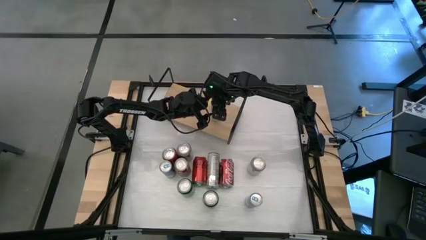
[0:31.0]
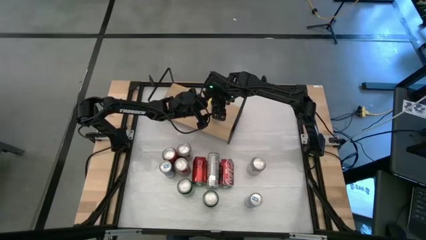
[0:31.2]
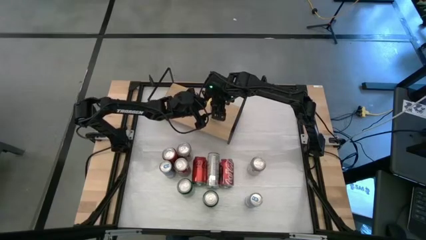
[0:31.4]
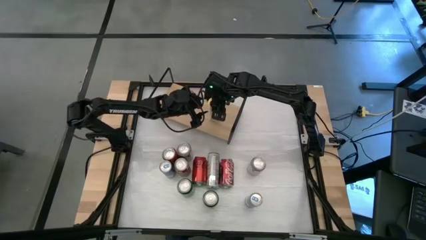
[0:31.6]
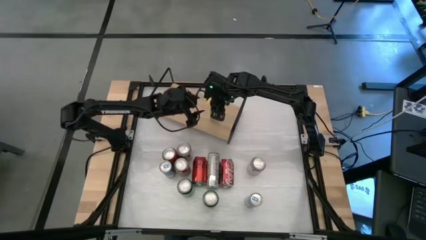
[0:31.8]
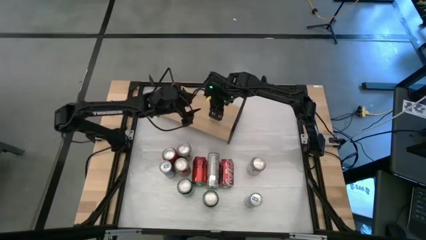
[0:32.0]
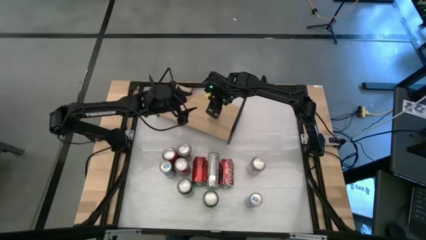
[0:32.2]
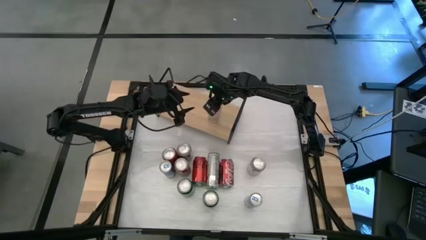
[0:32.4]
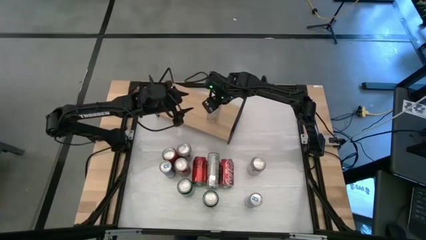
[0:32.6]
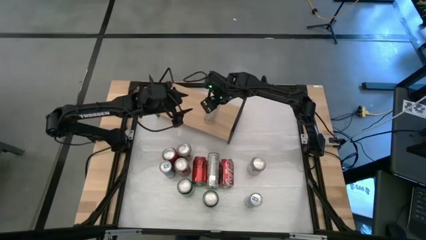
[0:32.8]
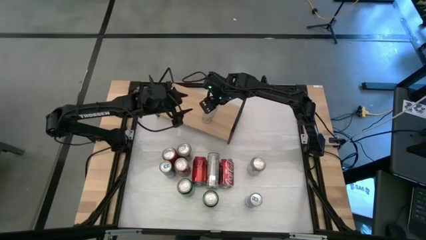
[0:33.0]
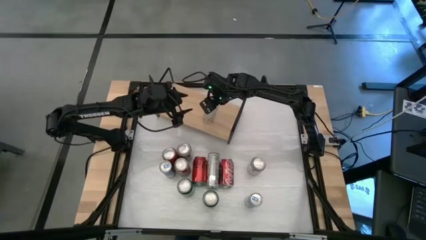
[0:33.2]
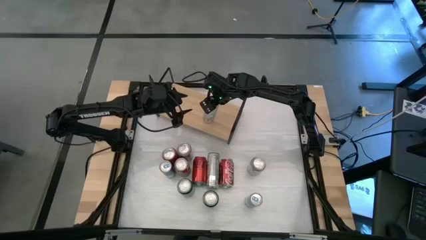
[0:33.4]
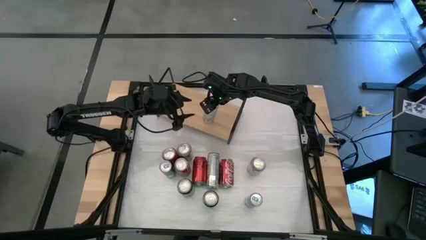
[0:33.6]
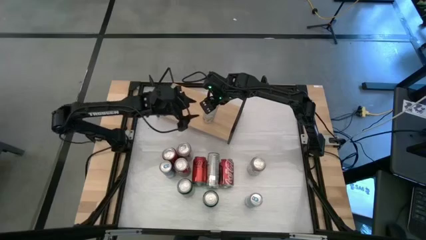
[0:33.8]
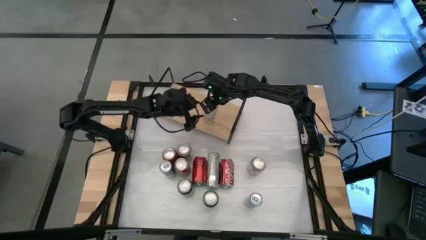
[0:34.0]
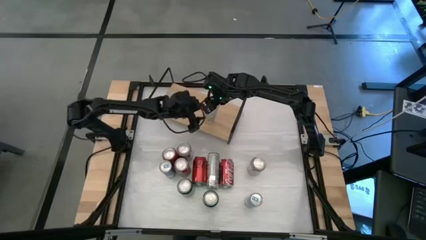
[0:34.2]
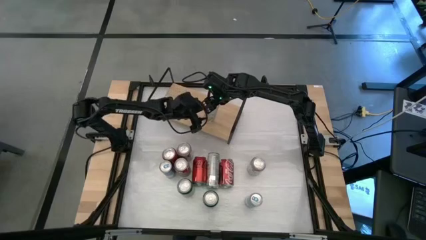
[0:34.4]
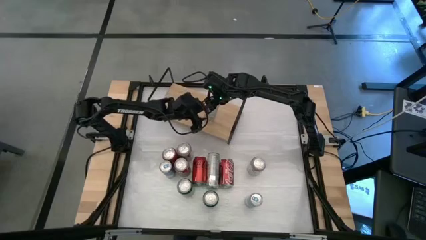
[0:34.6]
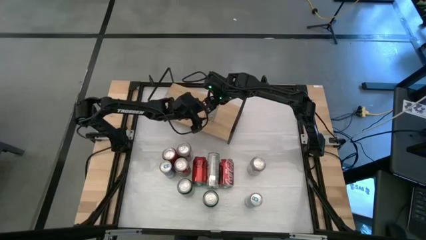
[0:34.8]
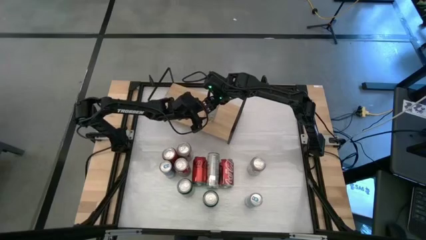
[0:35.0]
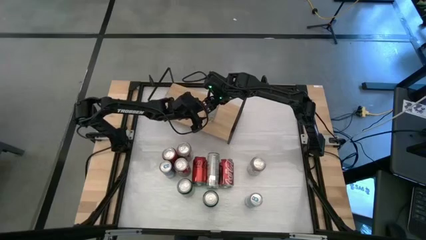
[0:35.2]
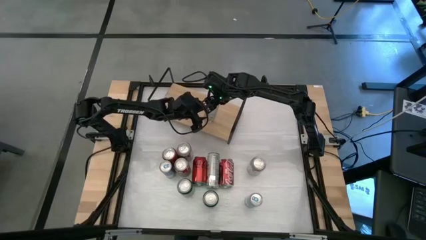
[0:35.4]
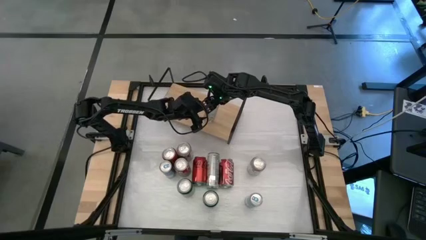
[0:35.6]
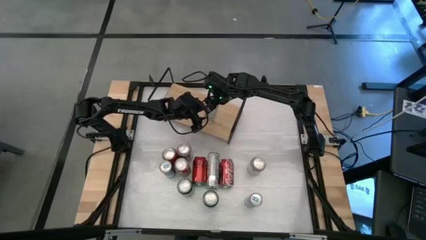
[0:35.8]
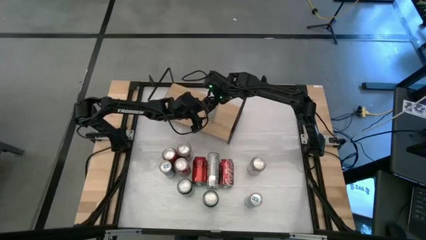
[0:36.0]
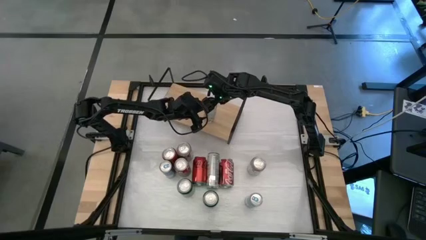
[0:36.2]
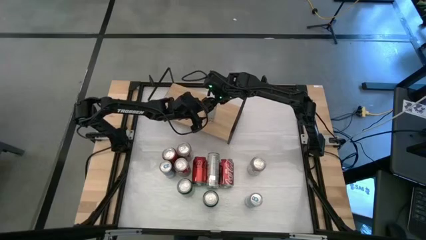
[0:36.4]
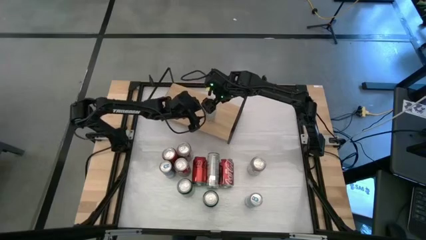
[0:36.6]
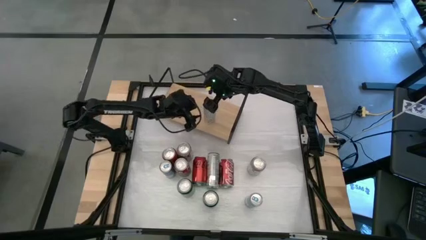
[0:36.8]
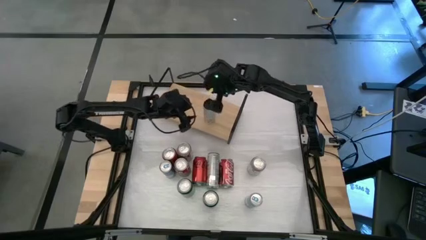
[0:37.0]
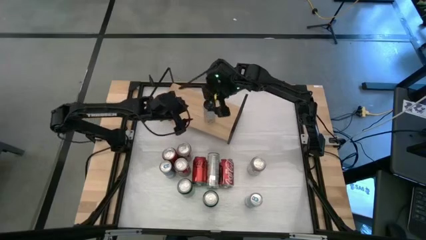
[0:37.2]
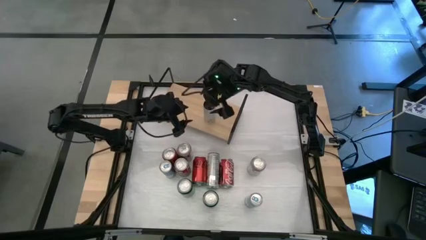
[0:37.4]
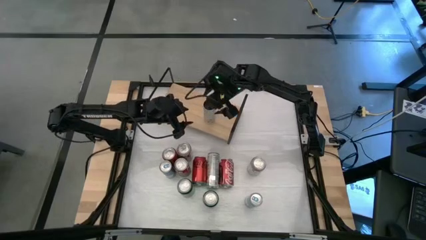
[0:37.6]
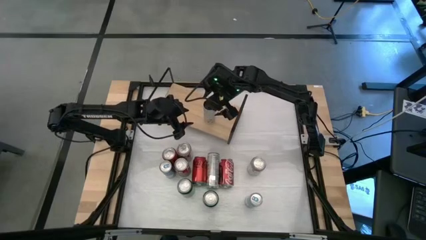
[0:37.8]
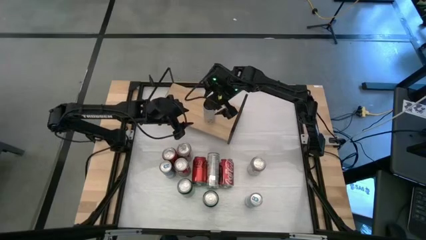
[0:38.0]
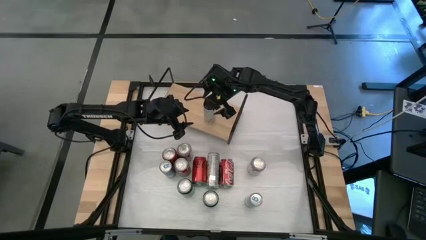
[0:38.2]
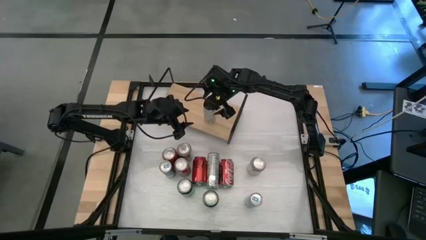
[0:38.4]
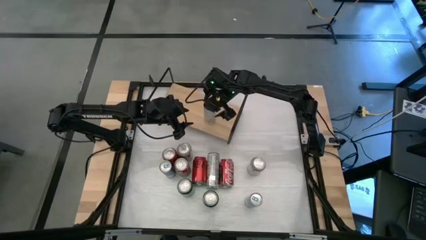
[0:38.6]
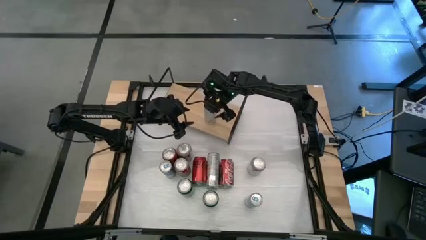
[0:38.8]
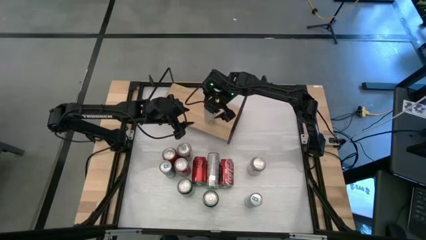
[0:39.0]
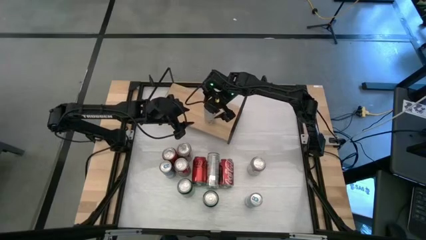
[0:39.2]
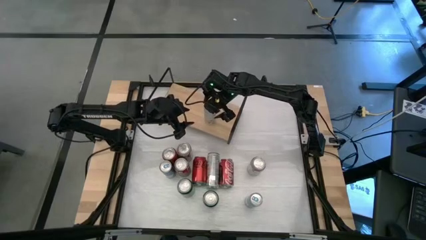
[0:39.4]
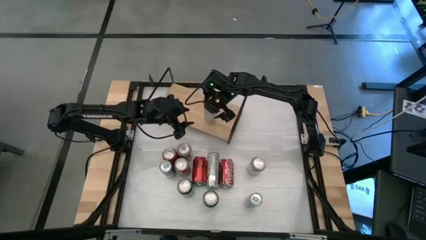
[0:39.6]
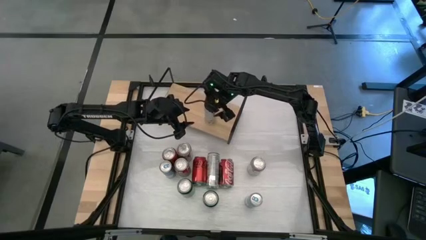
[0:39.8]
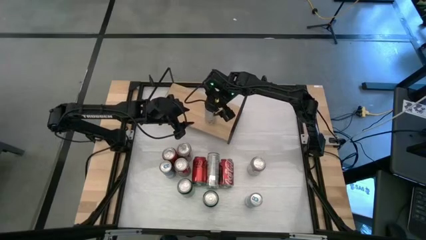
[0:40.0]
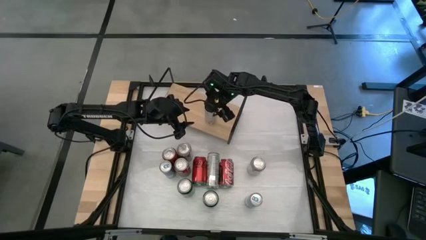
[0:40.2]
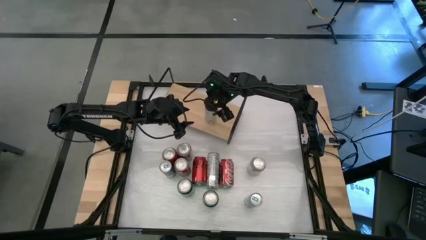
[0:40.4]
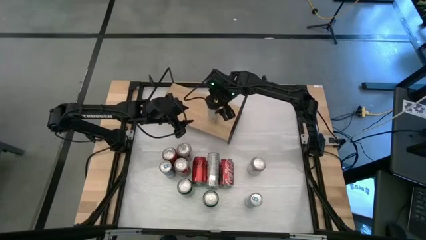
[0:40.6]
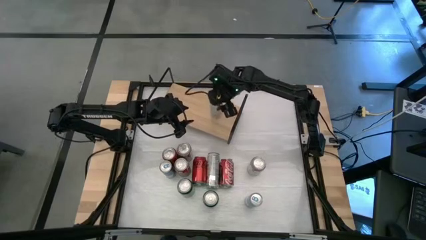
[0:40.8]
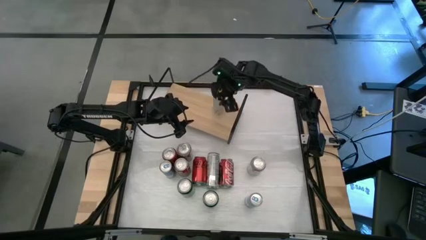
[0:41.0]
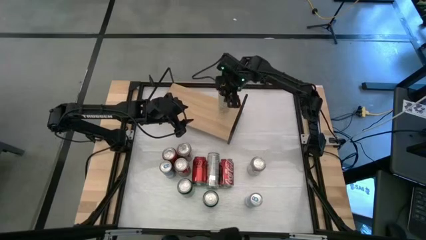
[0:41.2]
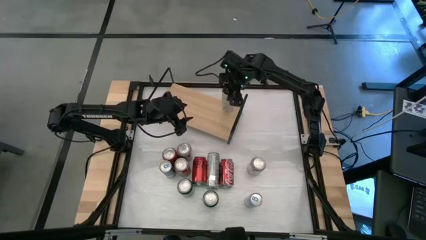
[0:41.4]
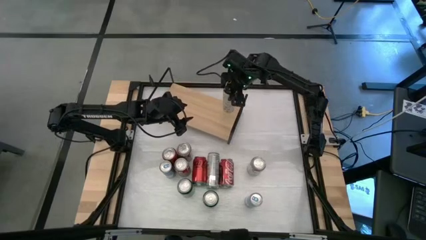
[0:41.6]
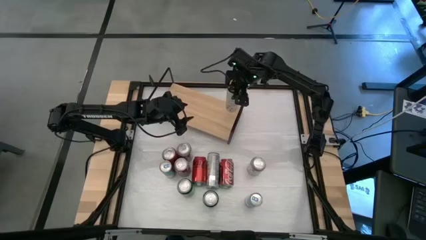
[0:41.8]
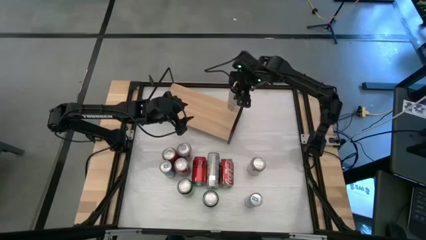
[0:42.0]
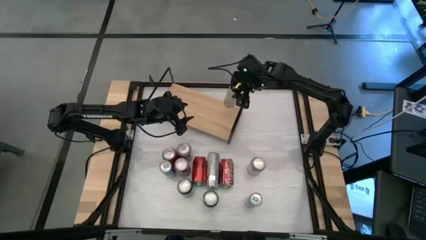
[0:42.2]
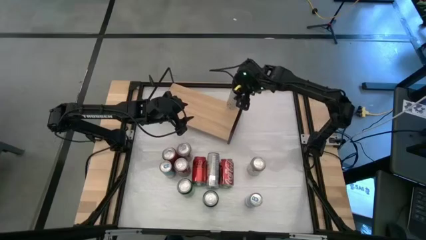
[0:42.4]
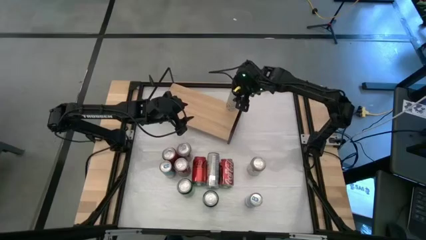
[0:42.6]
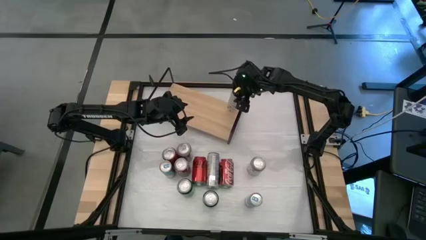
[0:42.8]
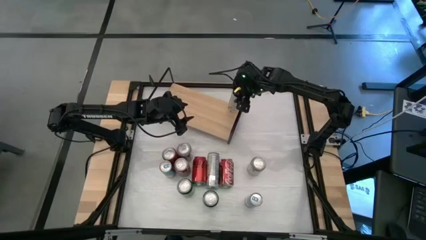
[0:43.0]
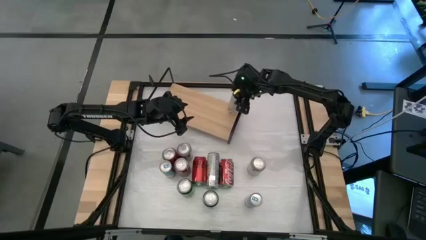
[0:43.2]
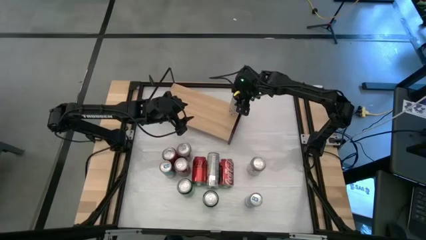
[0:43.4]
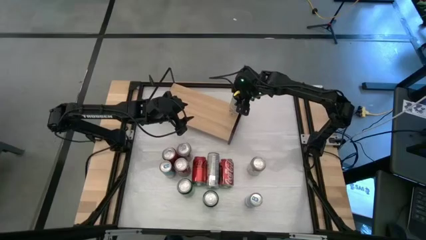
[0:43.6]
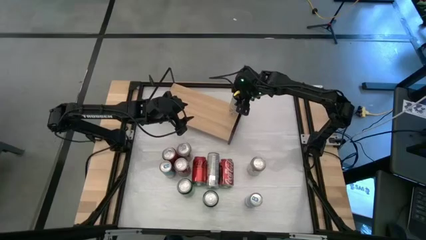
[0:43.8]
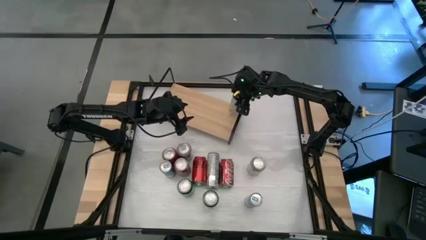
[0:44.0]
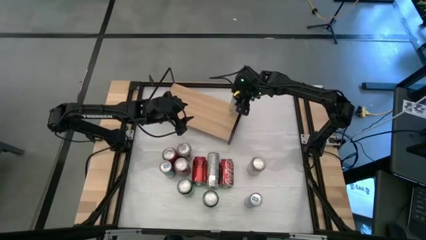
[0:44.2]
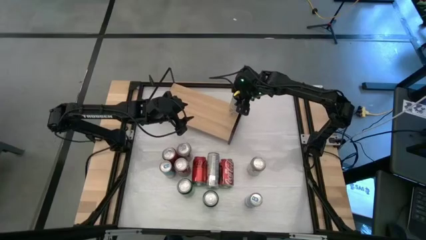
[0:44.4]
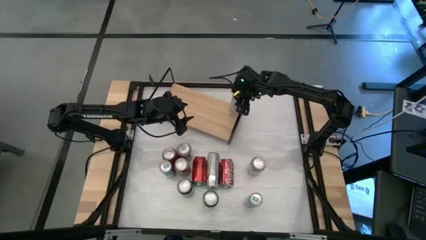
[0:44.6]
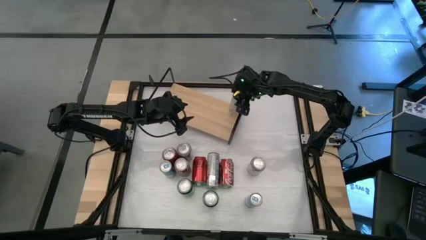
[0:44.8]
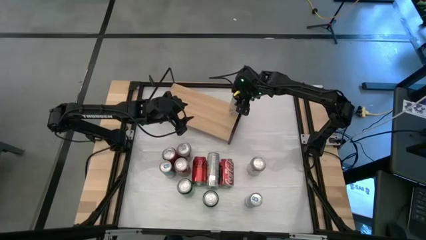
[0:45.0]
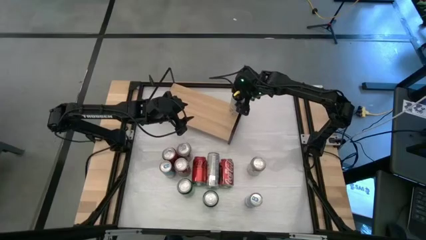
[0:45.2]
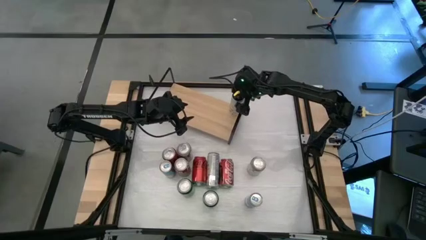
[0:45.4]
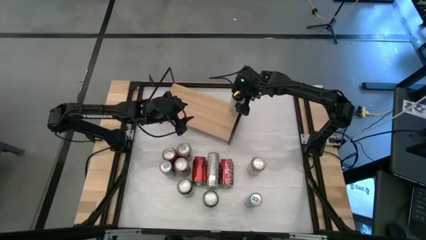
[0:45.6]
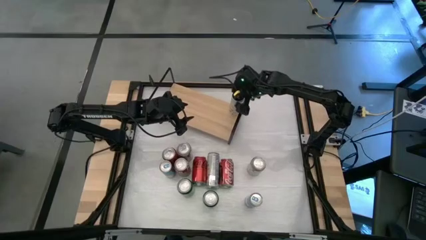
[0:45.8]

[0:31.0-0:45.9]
Task: Place canned beverage on shelf
Put the left white yellow soda can on the shelf

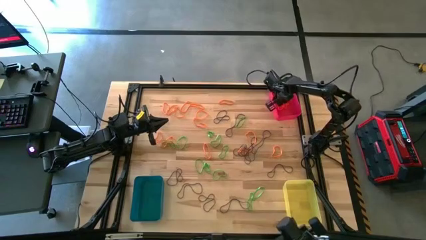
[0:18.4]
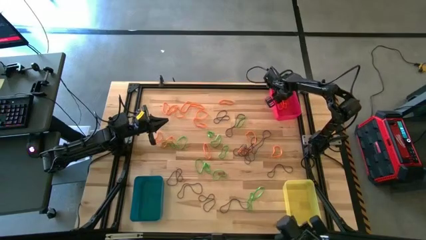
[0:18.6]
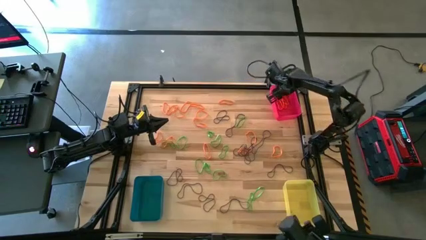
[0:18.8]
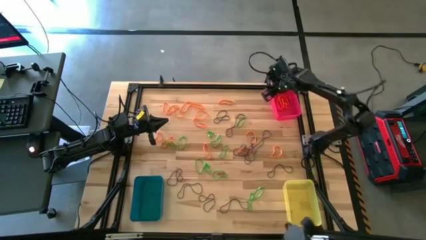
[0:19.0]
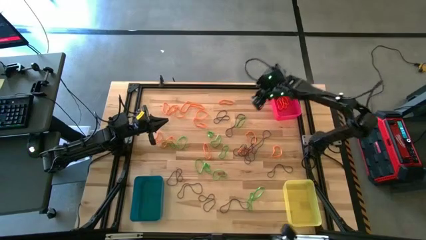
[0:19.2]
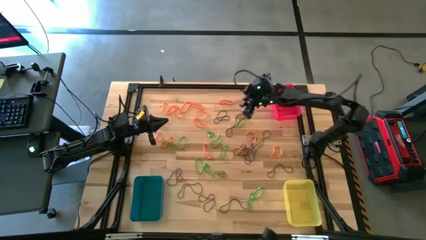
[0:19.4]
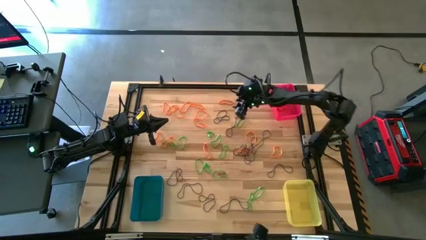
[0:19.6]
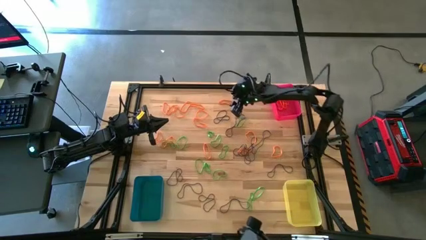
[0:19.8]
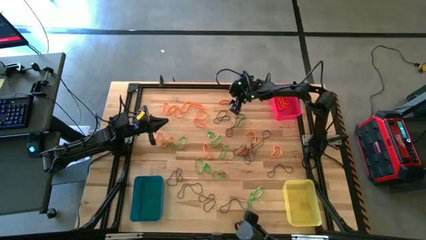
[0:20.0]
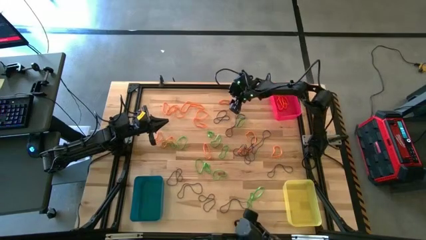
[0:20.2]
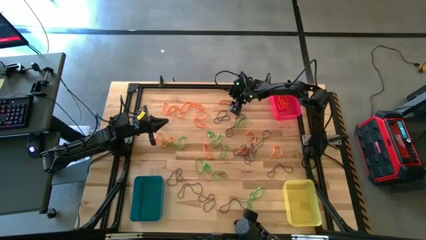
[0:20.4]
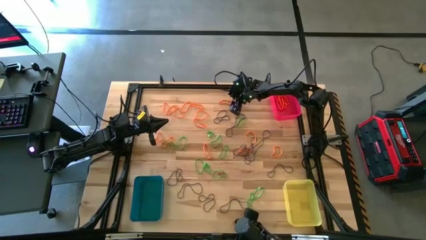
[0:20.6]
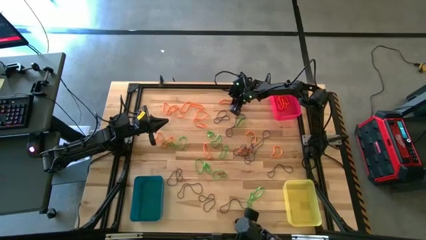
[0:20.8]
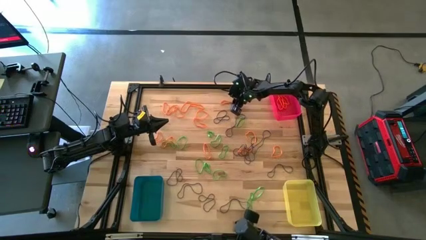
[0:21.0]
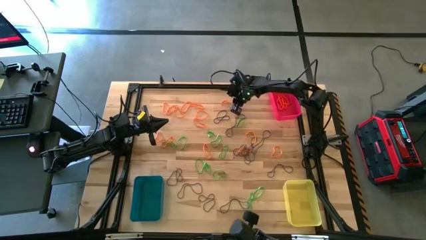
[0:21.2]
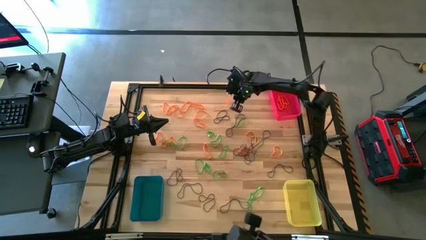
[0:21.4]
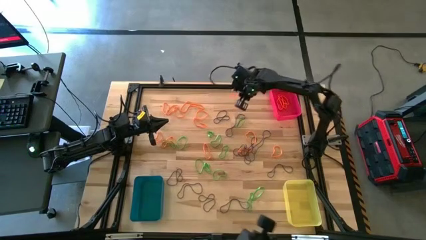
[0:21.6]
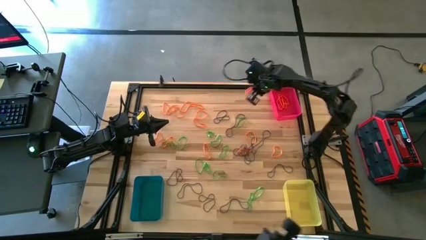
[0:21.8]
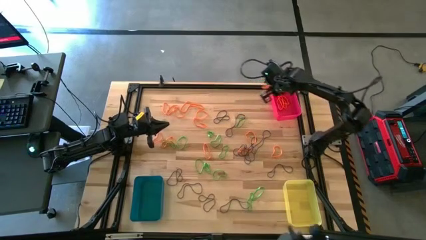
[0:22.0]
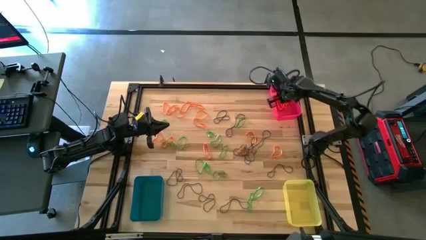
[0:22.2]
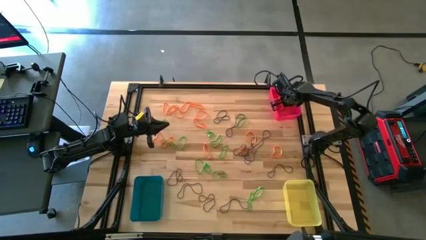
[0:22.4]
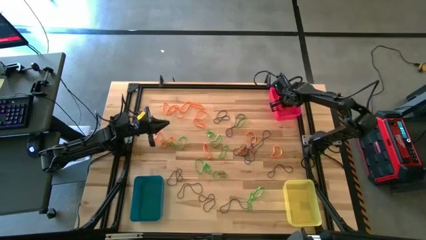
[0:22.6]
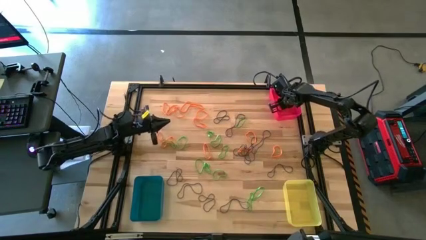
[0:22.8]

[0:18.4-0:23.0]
Task: Sort rubber bands into baskets
Put the orange rubber band into the red bin
